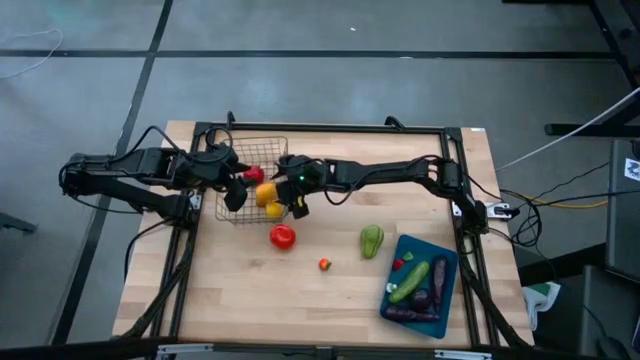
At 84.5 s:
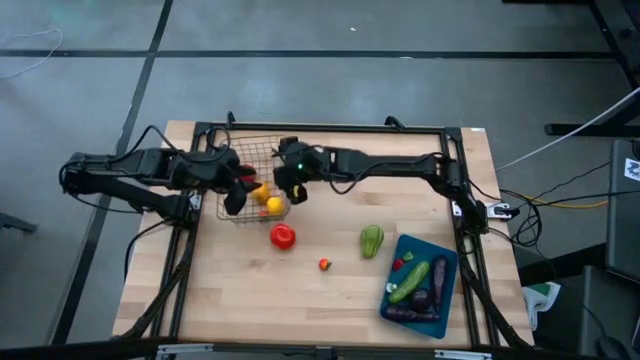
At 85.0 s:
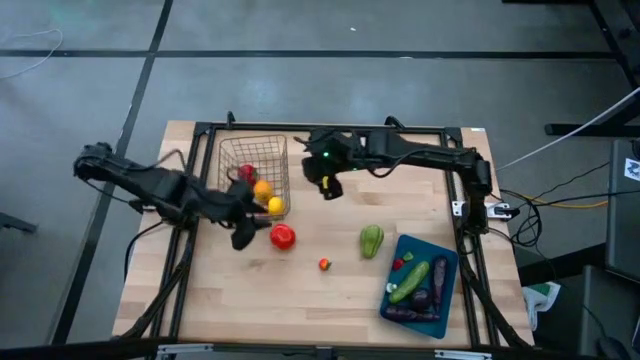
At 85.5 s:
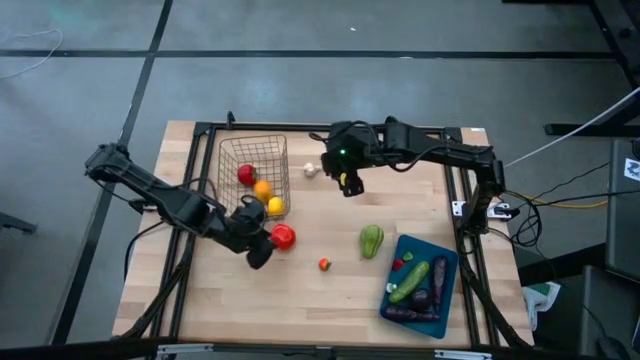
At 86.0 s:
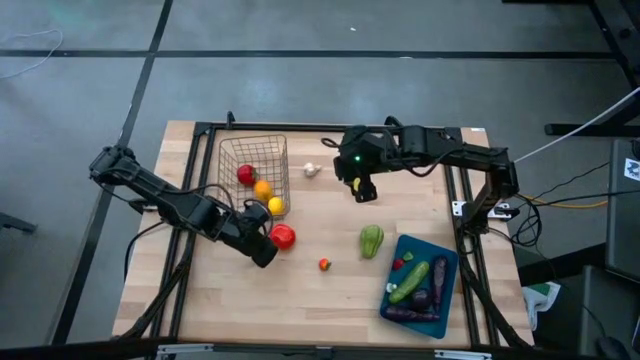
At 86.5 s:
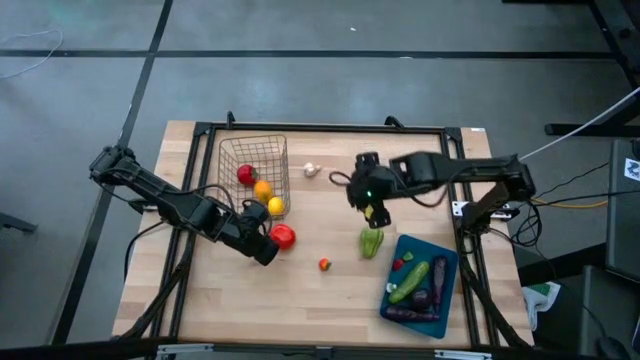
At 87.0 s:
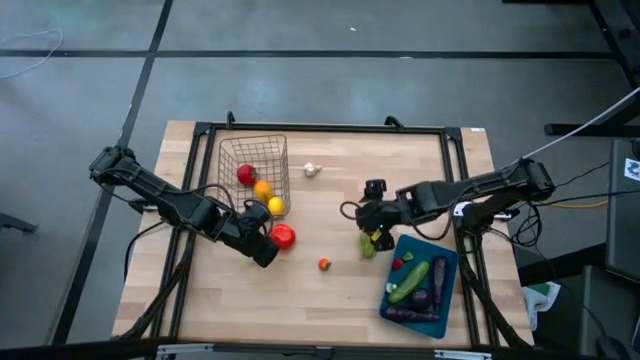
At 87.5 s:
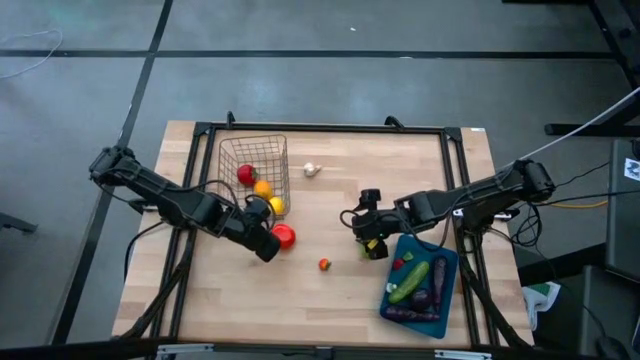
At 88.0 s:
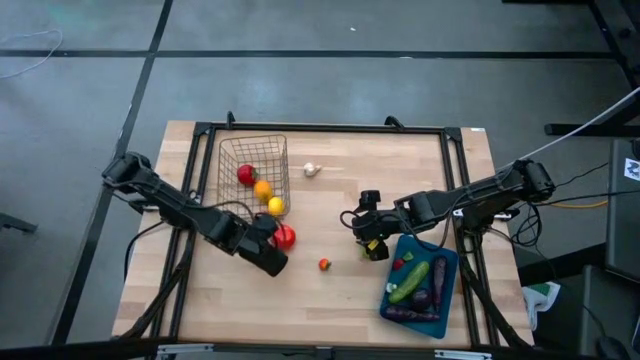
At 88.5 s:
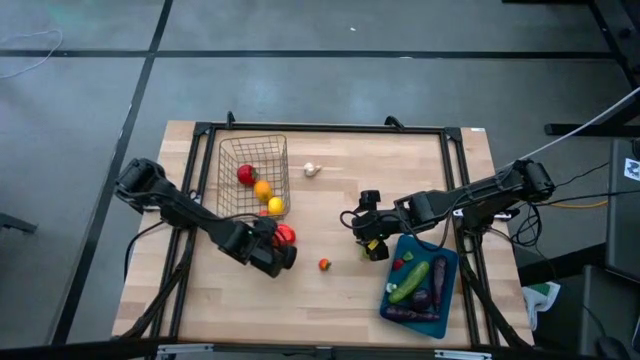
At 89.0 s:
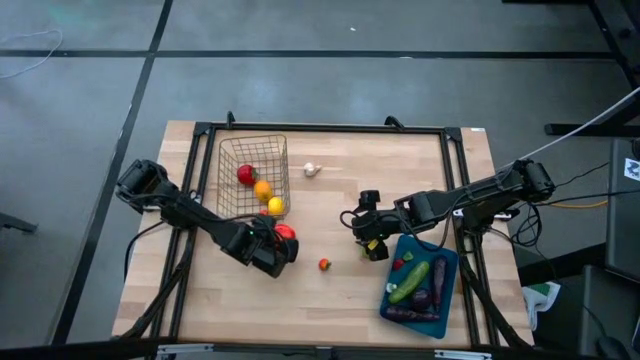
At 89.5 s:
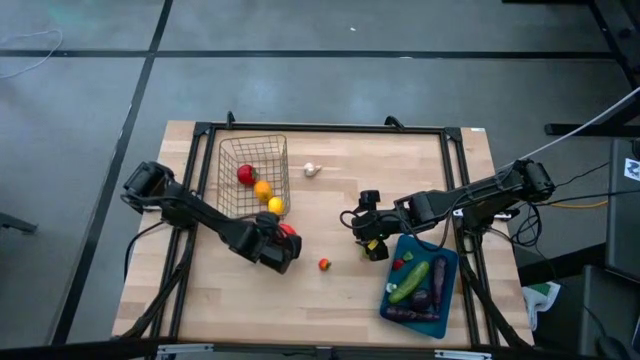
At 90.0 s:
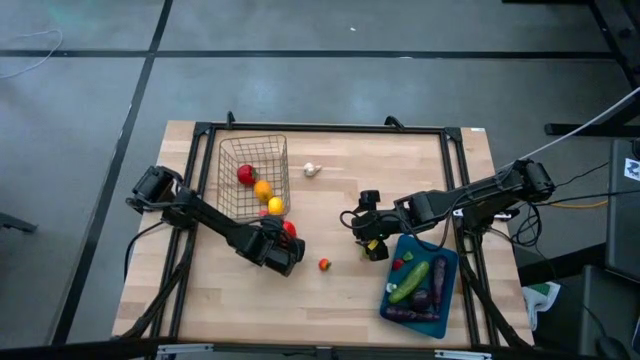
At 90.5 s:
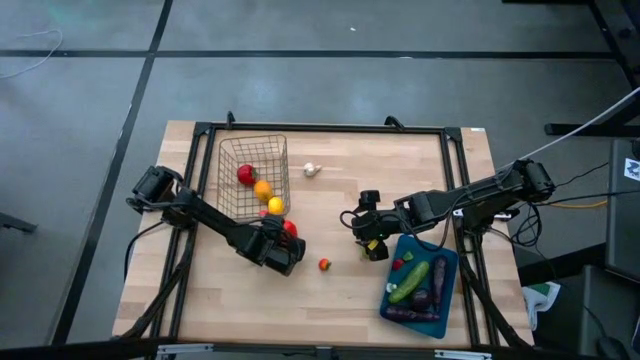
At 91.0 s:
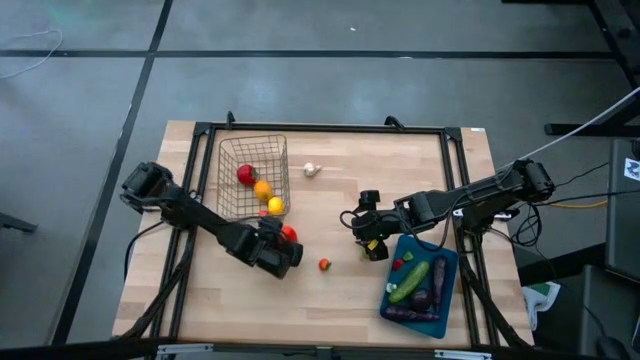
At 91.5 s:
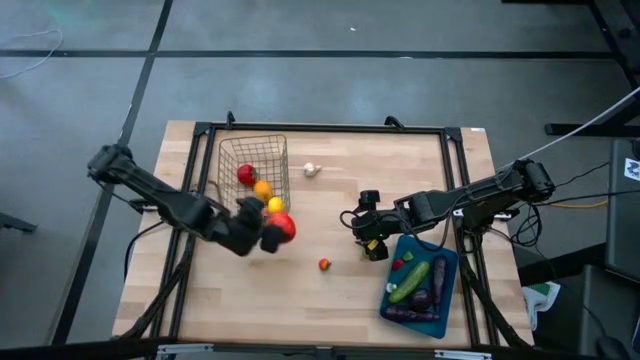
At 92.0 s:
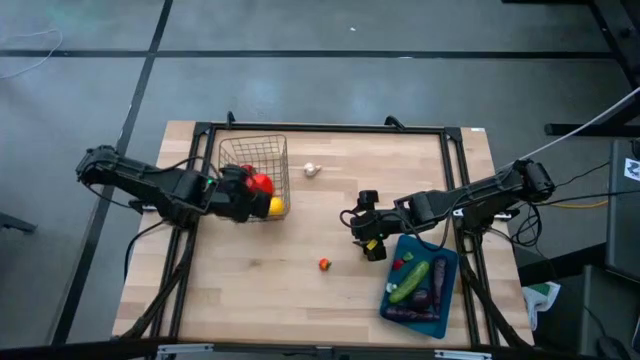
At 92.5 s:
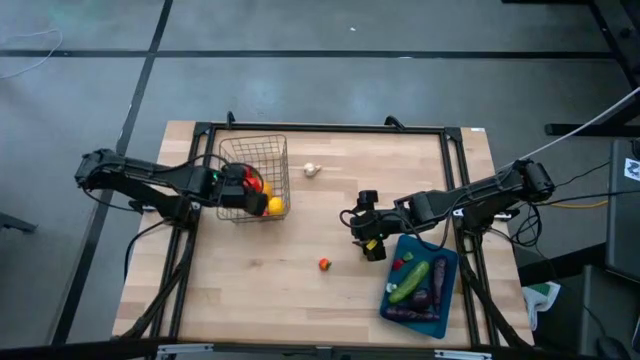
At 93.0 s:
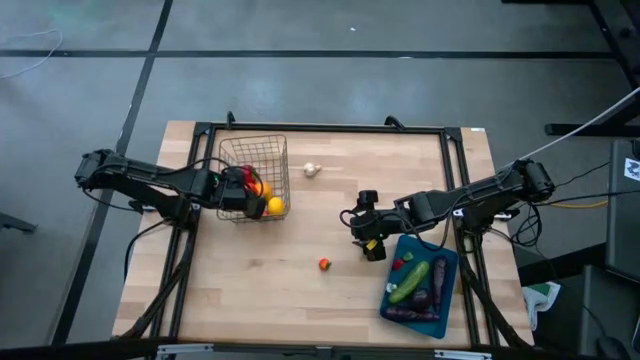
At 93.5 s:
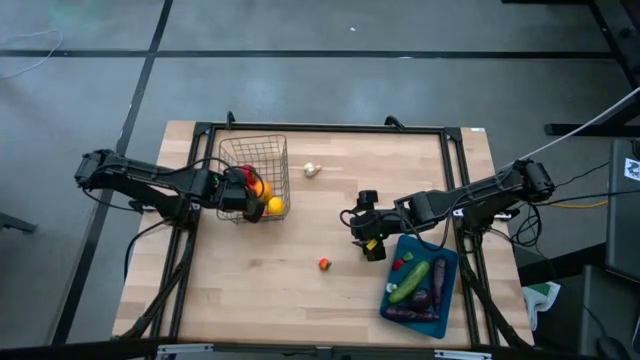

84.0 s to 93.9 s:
Task: Sort produce into baskets
Put the orange persimmon into the wire basket

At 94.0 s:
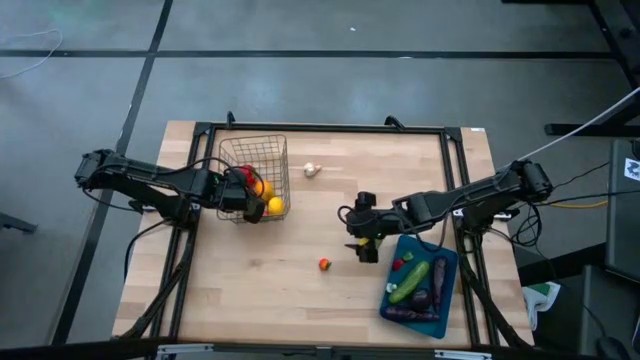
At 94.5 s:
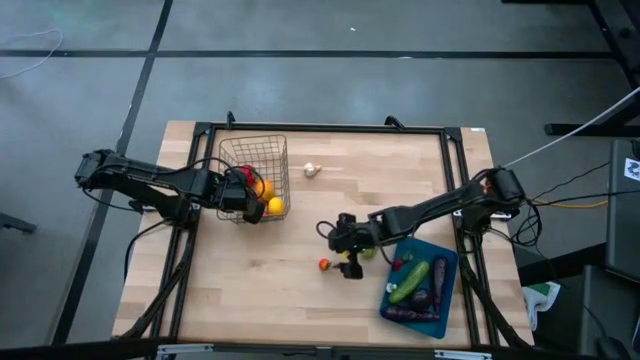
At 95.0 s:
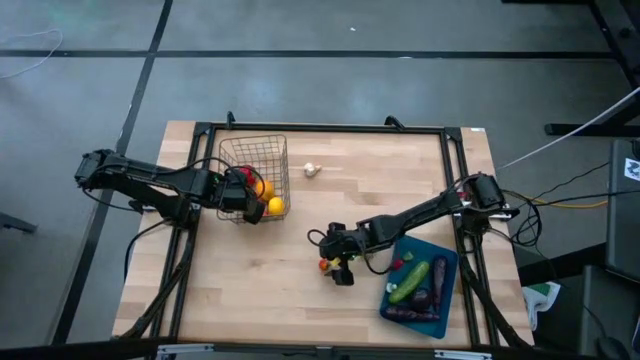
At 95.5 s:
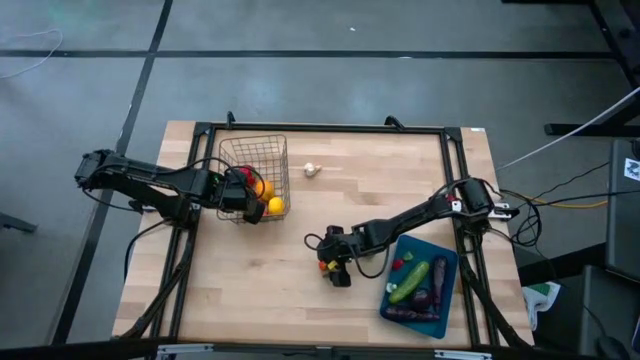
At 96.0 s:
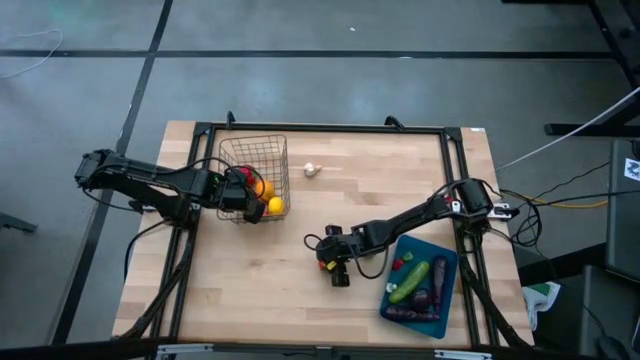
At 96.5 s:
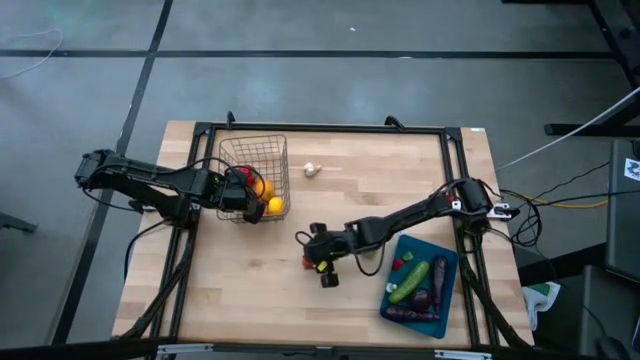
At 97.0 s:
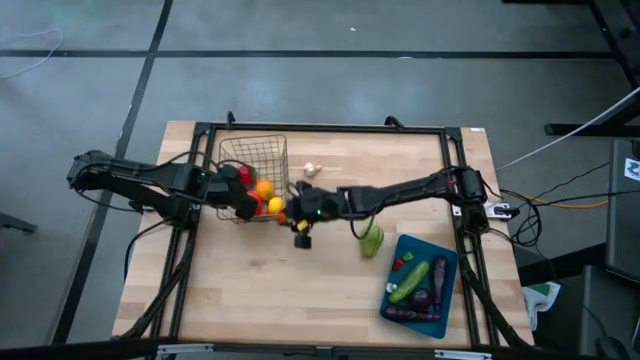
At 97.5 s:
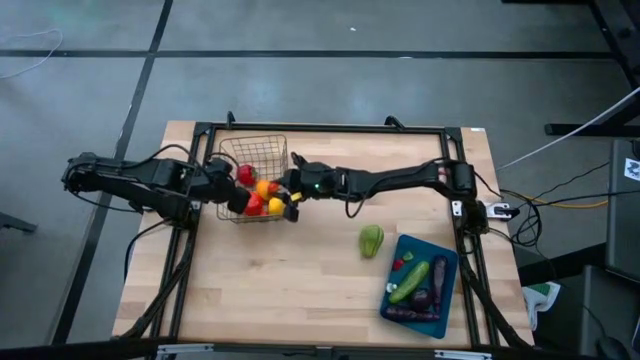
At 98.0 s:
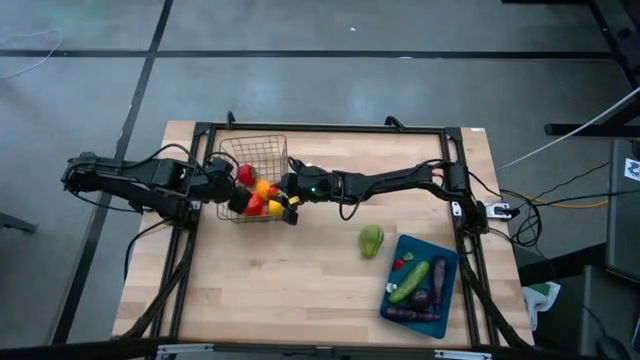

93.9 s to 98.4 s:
Put the orange peach into the wire basket

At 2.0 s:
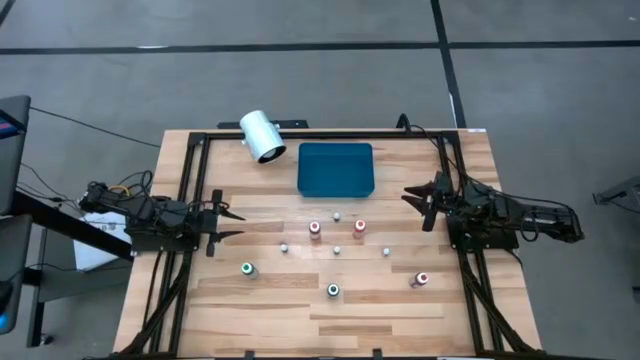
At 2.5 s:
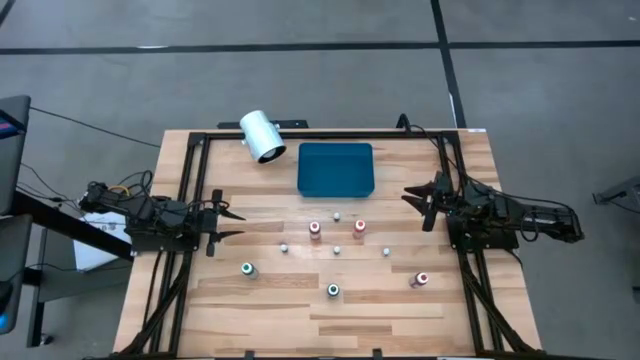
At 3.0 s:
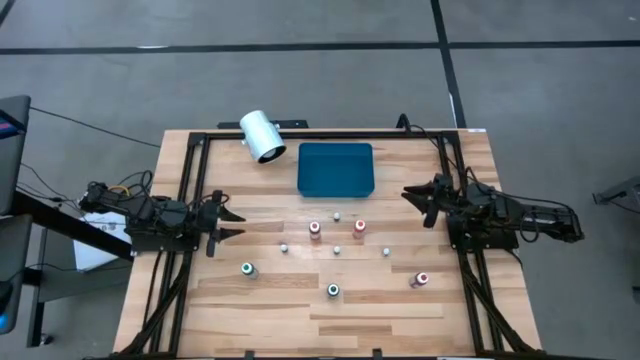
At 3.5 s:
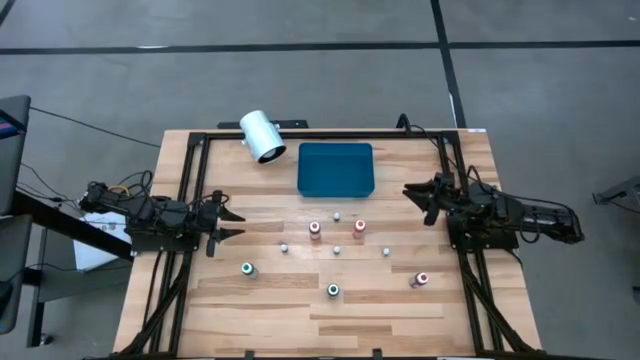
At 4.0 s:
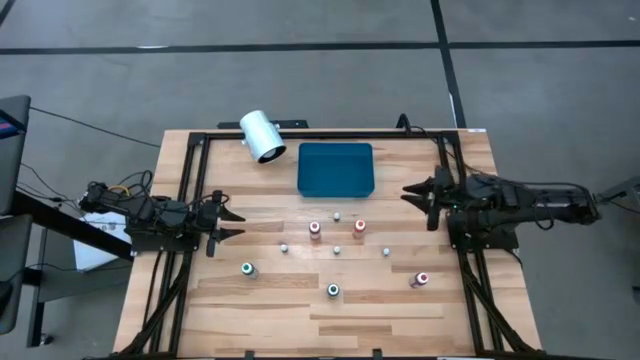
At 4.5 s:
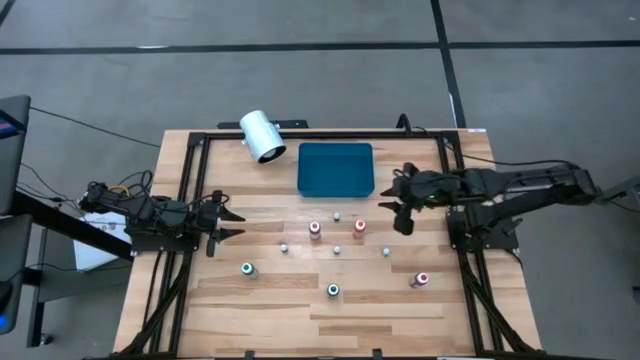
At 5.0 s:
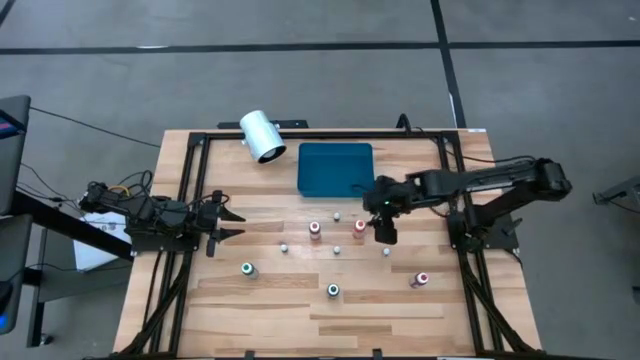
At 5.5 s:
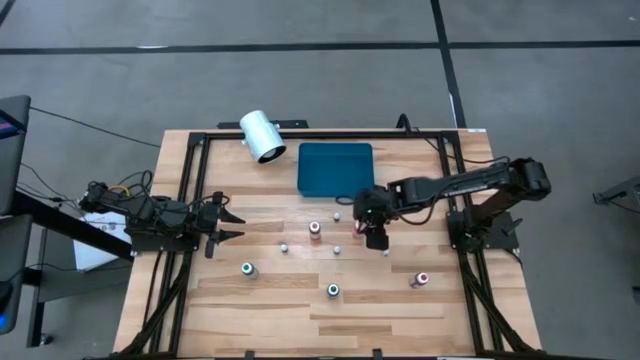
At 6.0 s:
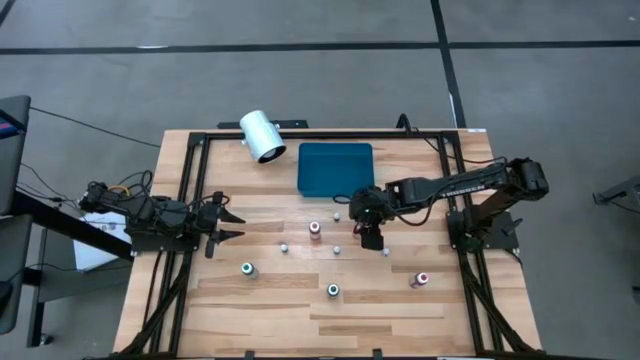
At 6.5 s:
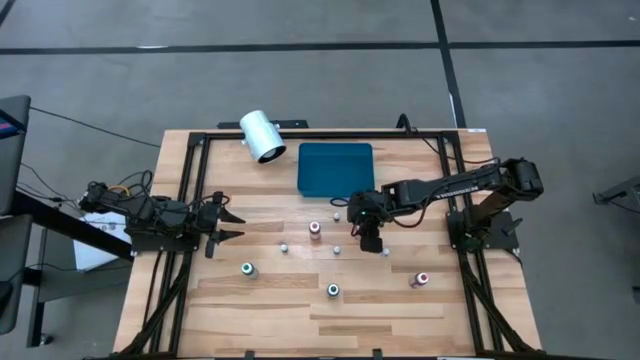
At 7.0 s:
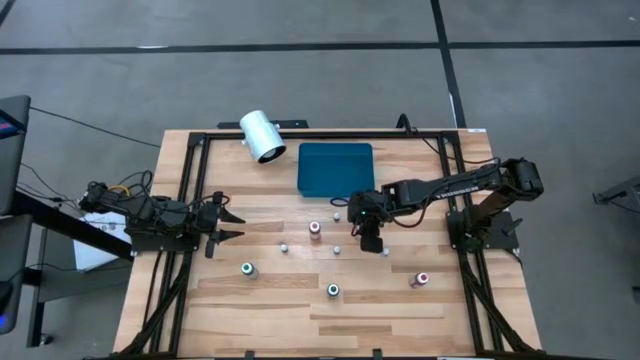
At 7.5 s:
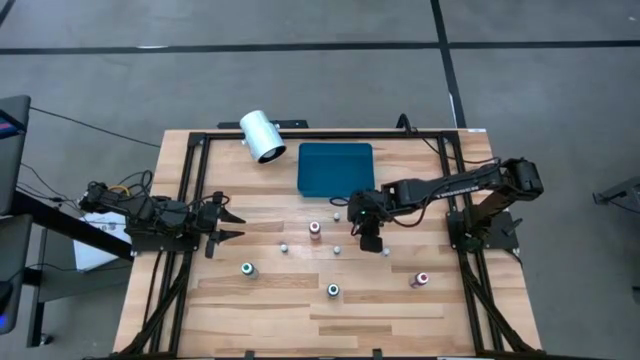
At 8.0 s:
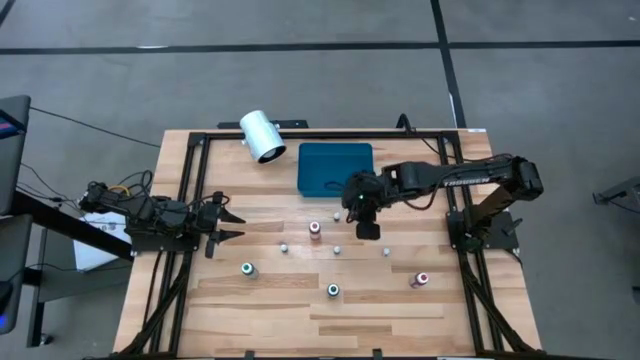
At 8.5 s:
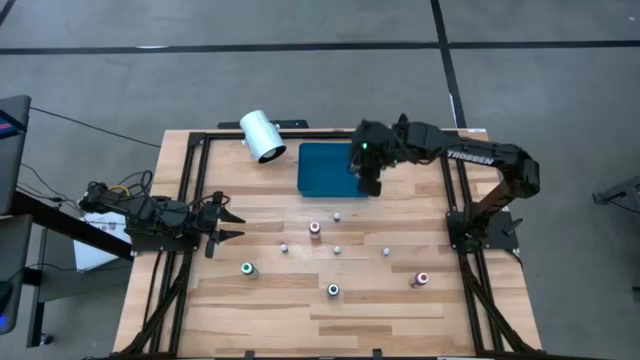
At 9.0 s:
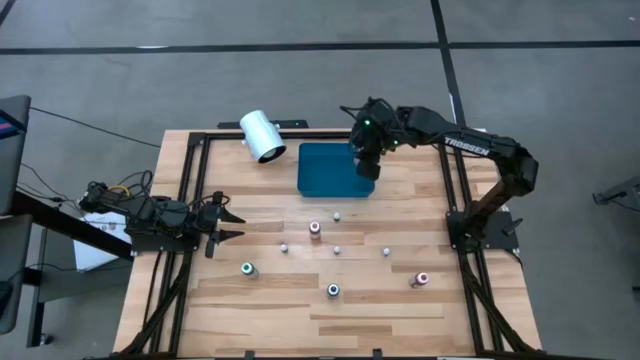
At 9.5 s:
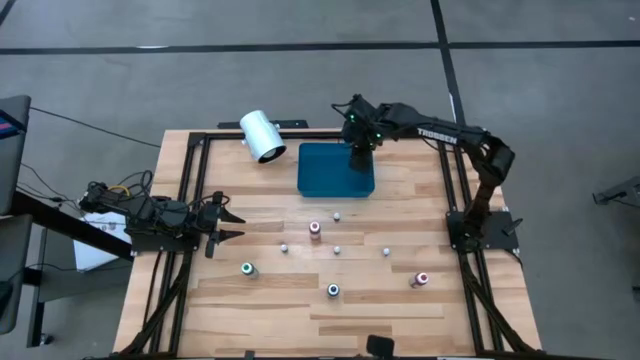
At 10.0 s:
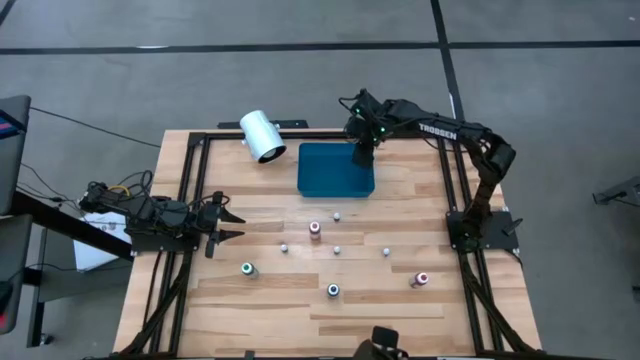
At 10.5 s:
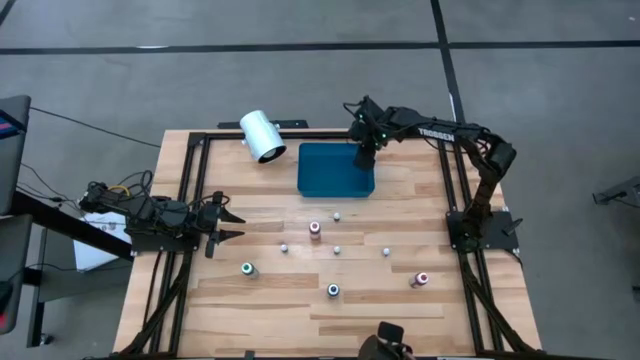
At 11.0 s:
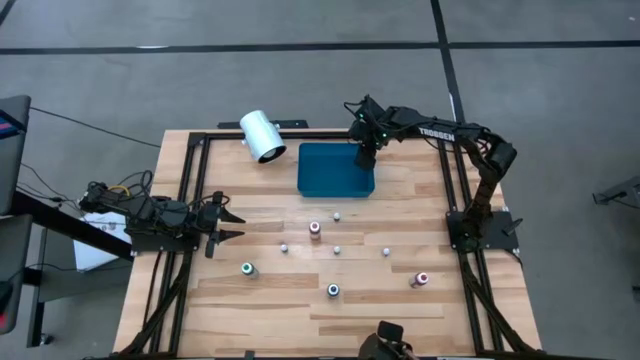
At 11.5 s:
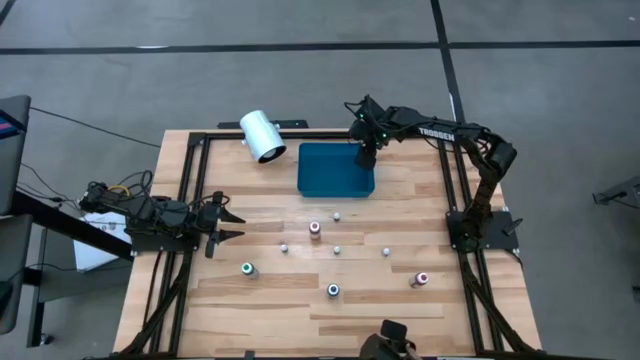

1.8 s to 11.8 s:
Task: Pick & Place food coloring
Put the large orange food coloring bottle into the blue bin
